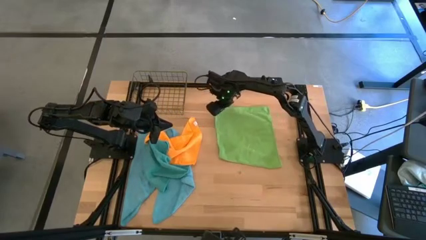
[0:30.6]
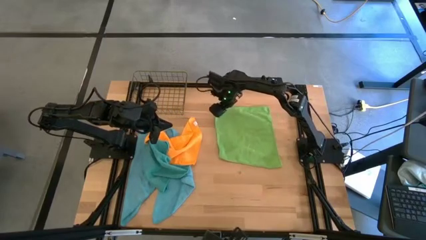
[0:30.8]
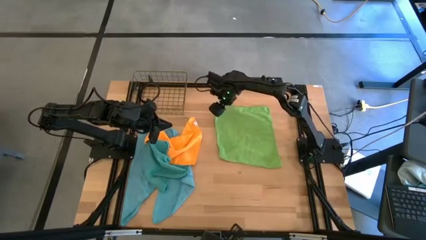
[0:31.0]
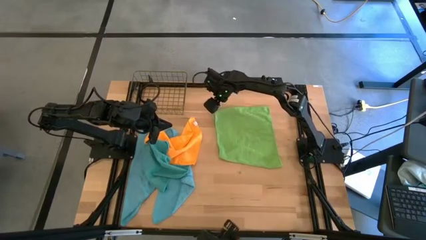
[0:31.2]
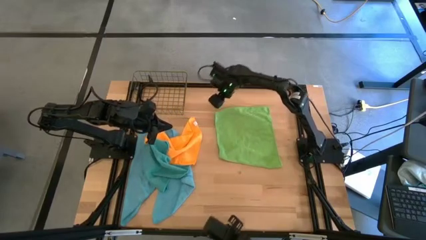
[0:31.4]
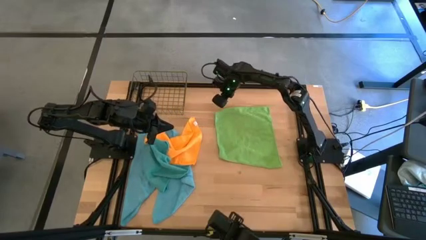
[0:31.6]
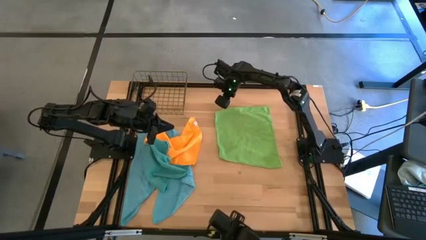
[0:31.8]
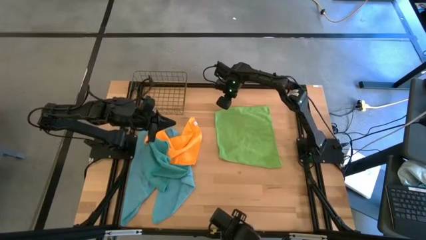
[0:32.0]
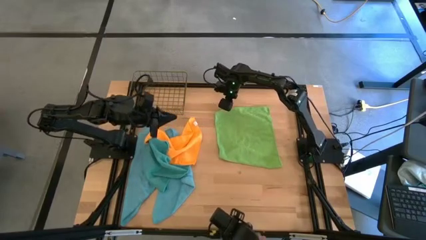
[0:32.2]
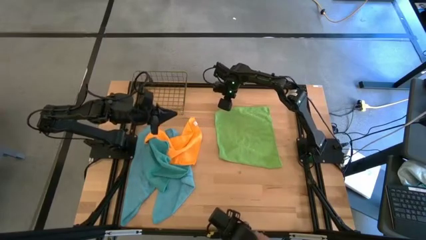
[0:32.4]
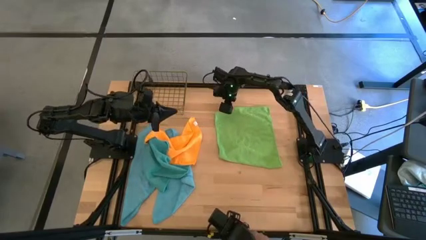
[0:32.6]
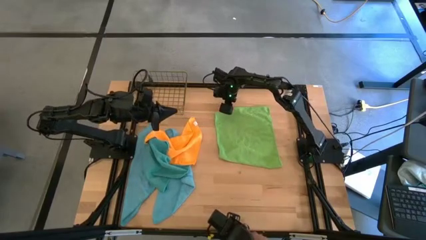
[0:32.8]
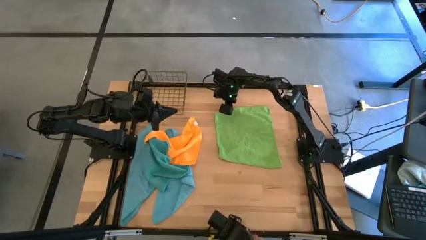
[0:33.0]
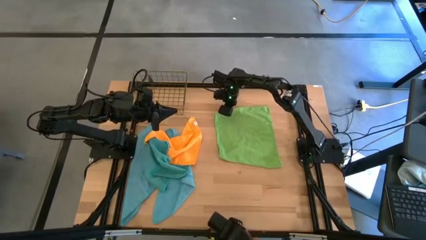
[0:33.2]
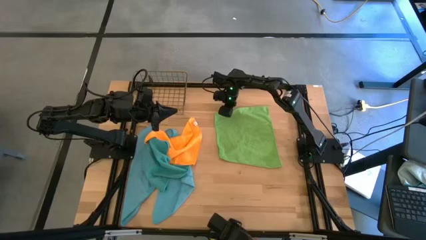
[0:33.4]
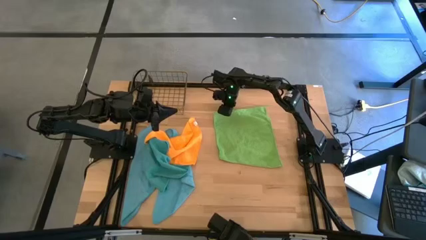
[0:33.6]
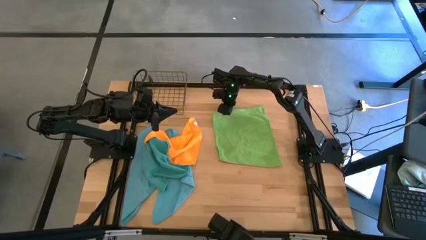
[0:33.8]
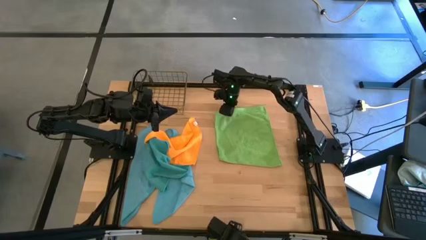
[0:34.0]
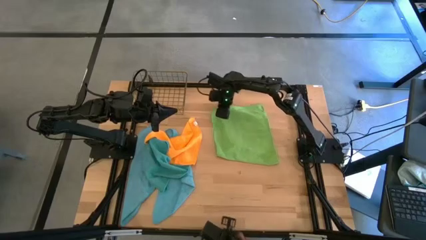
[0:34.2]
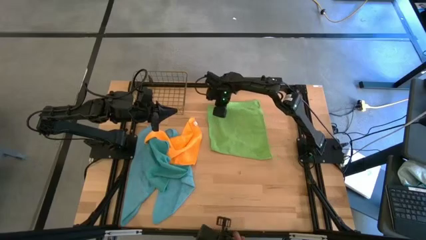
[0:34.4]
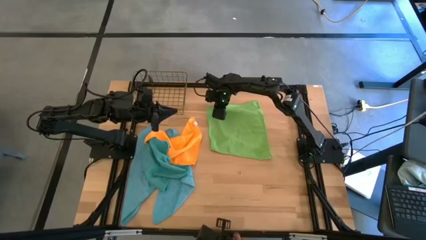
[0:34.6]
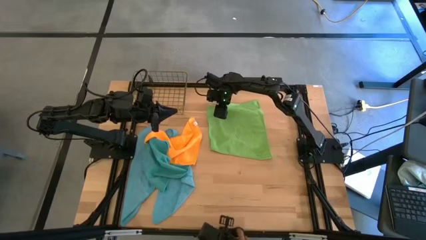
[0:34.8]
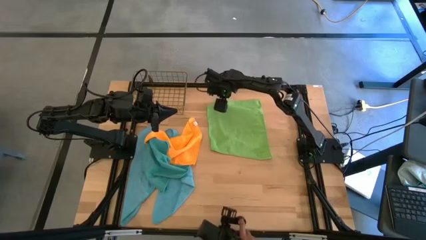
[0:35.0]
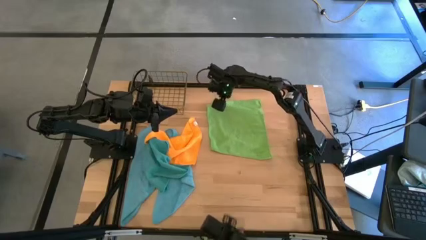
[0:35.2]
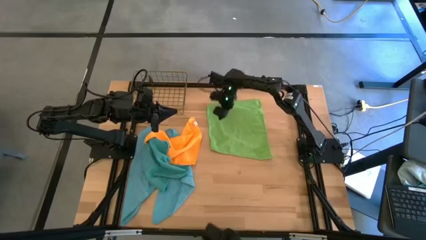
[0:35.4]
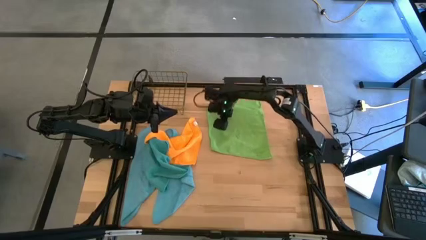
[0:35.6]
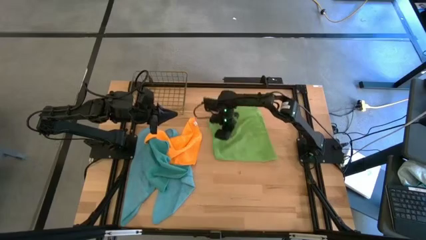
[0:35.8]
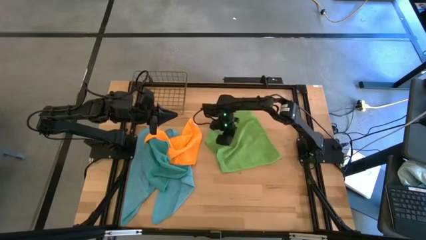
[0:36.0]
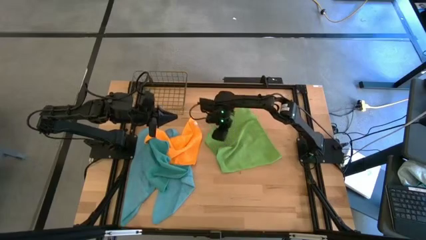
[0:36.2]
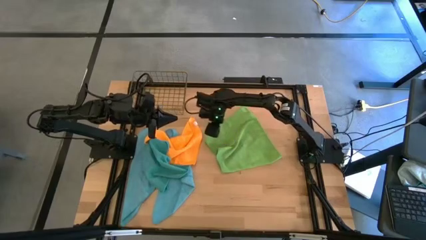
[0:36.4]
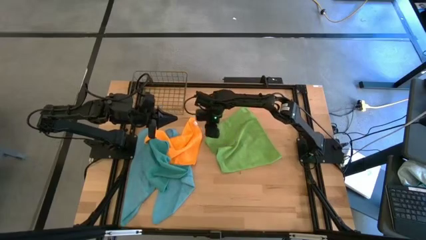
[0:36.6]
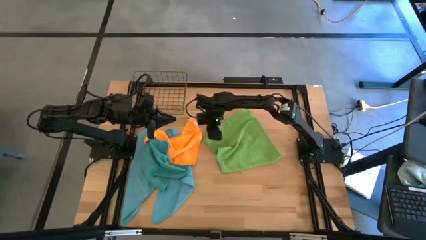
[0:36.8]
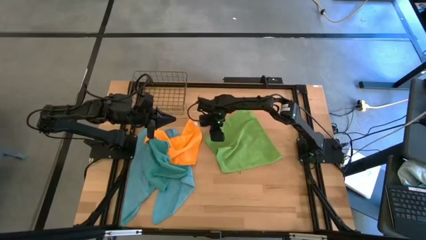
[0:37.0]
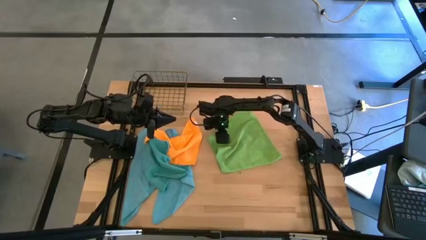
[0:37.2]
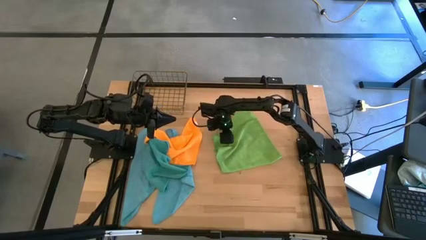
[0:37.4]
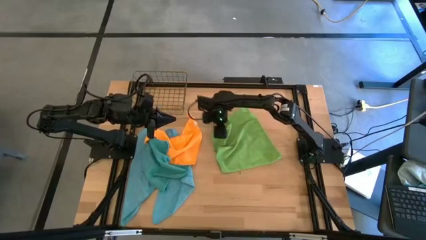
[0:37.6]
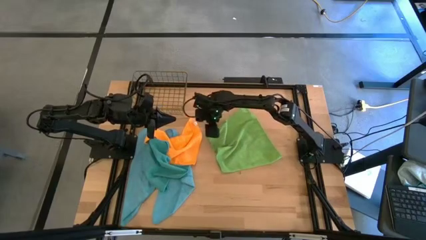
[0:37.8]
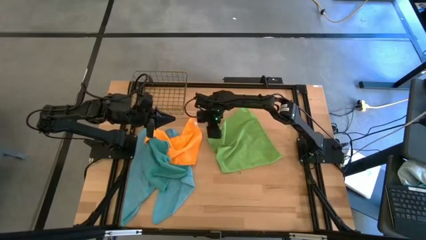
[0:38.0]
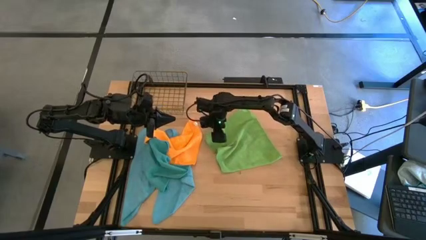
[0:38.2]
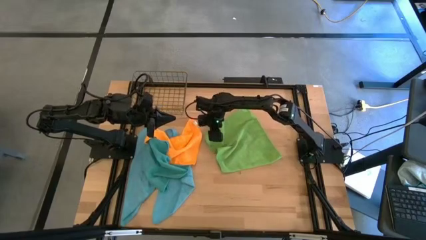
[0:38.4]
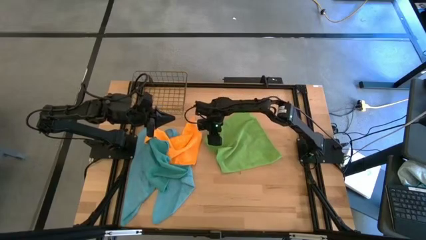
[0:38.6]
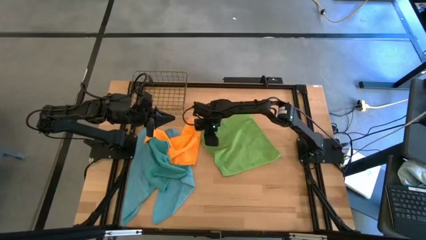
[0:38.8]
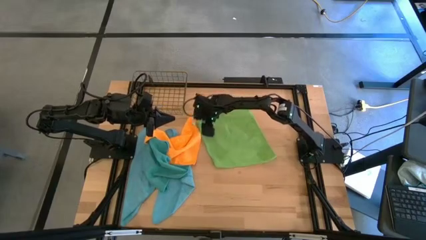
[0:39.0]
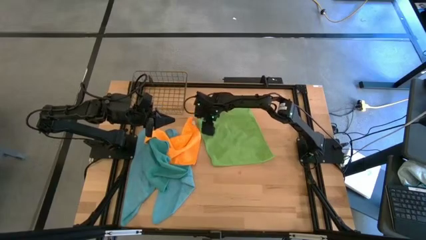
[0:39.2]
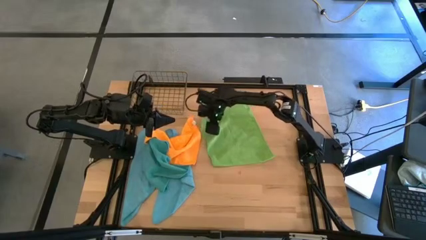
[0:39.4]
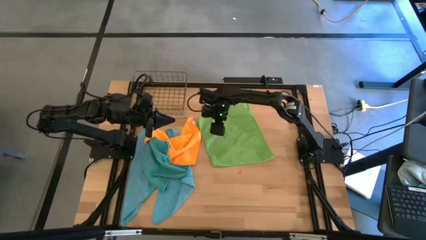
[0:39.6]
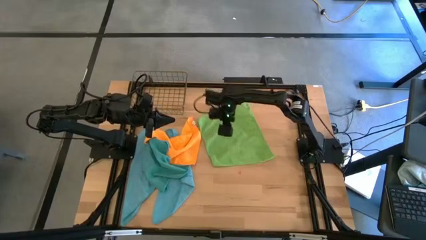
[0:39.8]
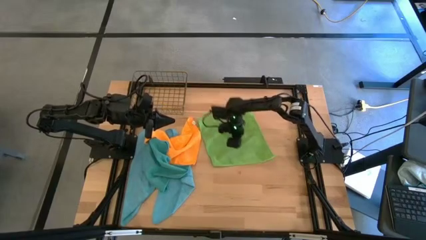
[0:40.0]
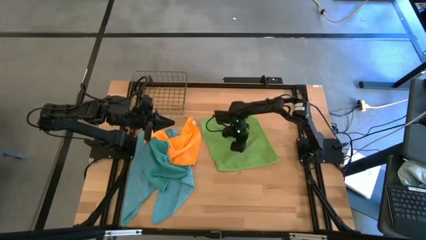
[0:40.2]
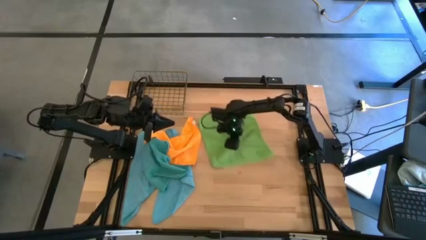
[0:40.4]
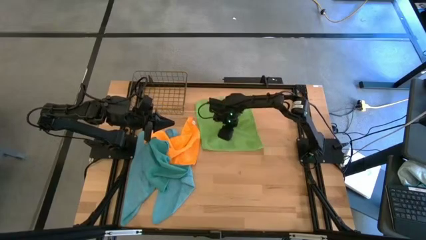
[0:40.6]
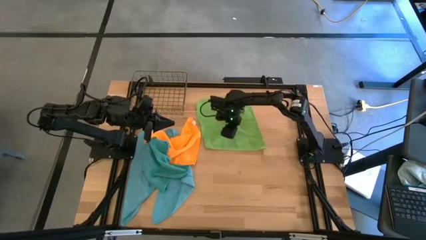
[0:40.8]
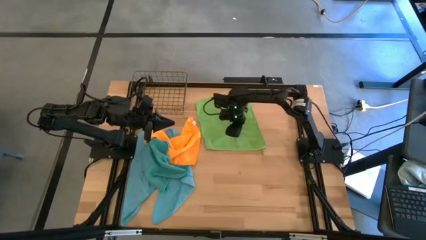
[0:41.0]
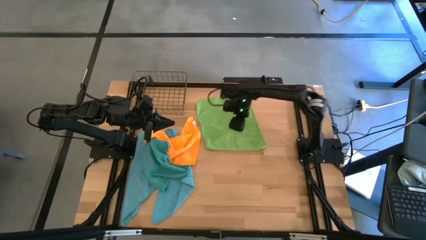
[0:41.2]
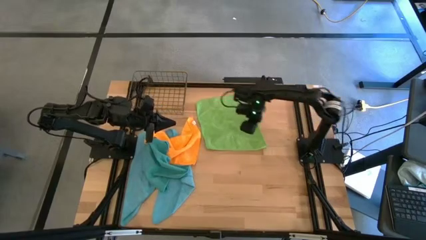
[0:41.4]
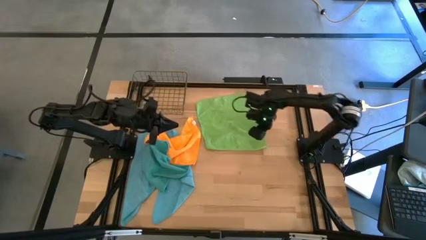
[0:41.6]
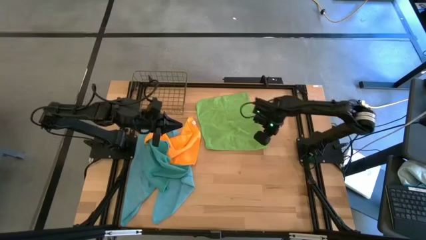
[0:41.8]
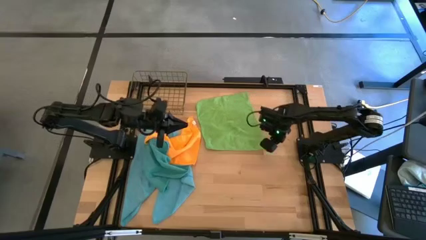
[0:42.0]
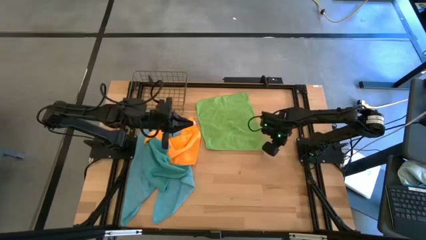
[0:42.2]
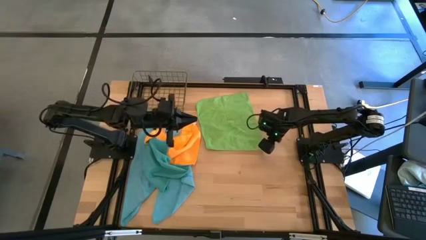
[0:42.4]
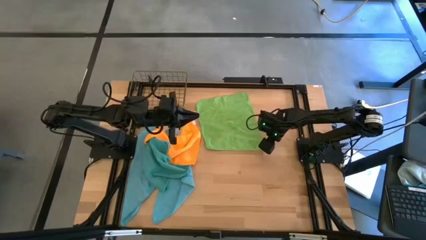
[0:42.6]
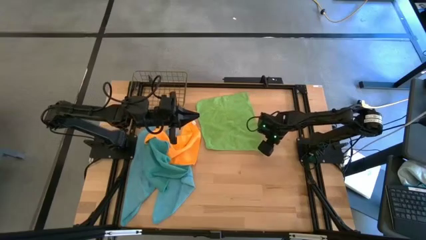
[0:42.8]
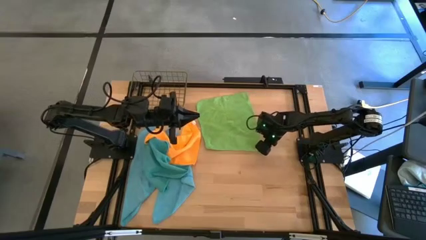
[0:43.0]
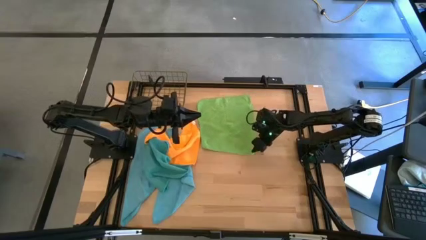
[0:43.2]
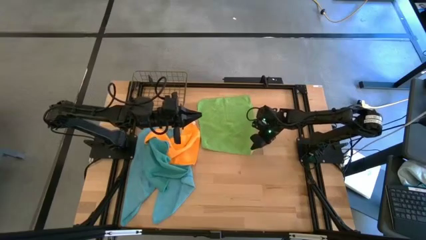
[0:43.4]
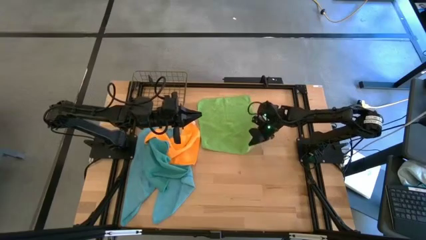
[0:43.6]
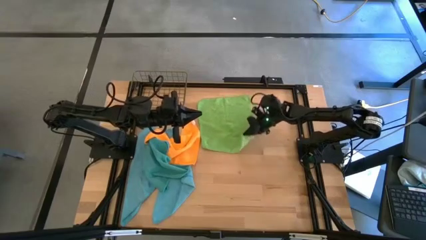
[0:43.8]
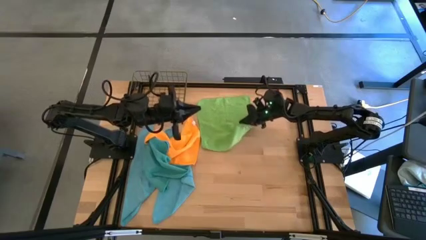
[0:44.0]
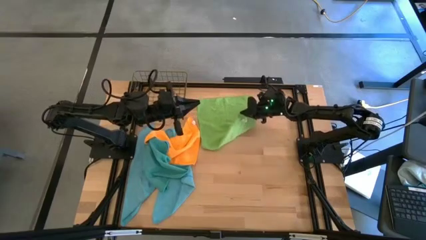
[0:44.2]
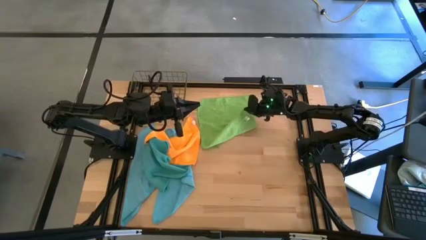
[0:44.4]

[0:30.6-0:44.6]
Task: Fold microfiber towels
Fold the green microfiber cloth

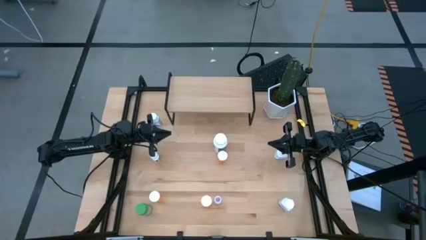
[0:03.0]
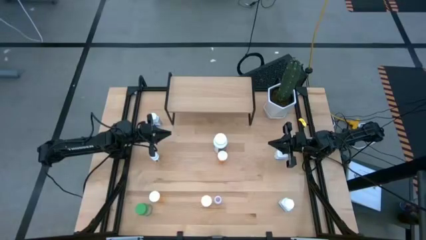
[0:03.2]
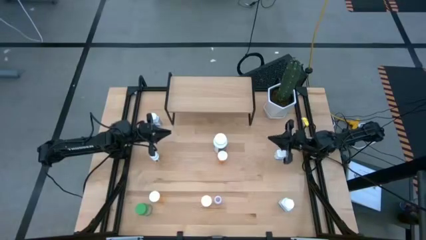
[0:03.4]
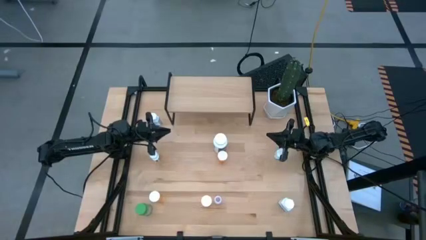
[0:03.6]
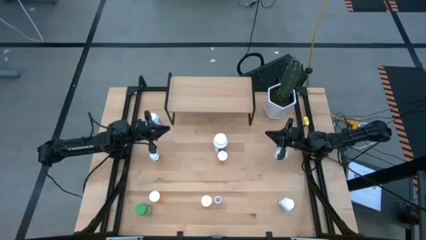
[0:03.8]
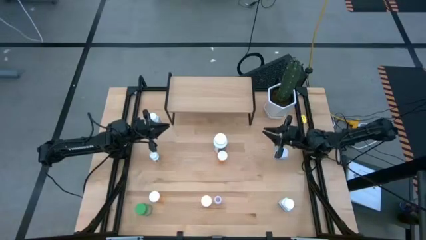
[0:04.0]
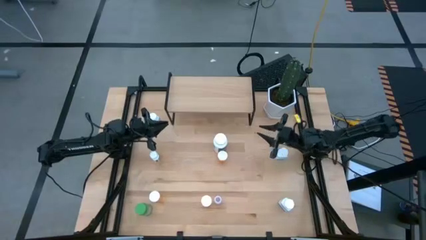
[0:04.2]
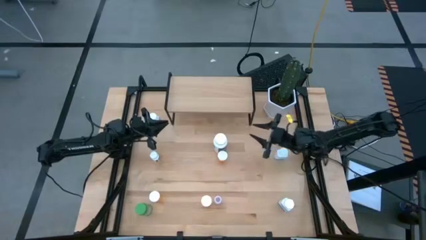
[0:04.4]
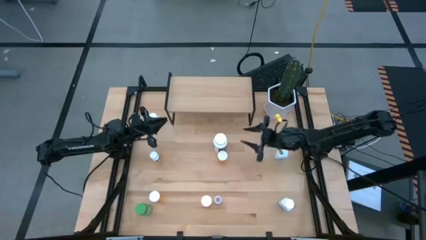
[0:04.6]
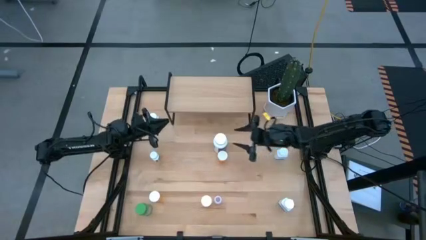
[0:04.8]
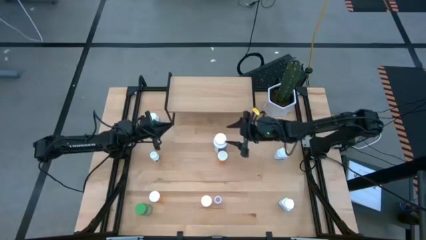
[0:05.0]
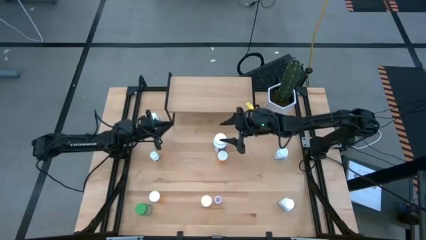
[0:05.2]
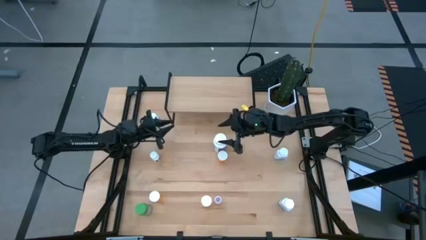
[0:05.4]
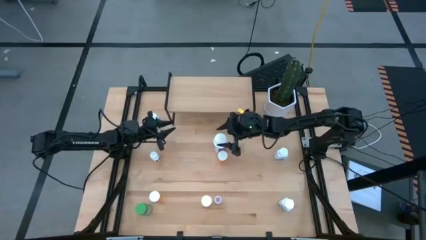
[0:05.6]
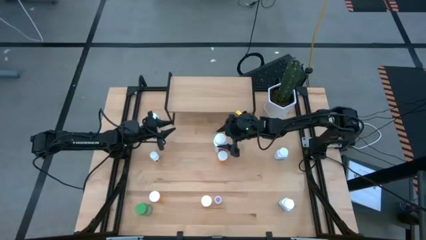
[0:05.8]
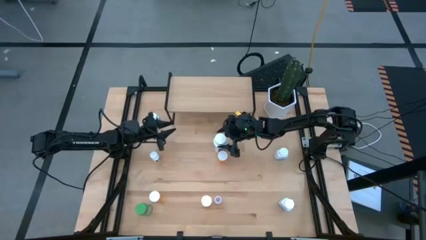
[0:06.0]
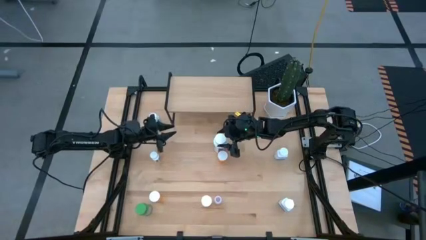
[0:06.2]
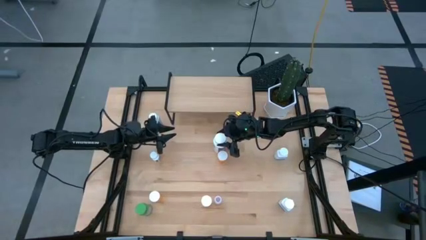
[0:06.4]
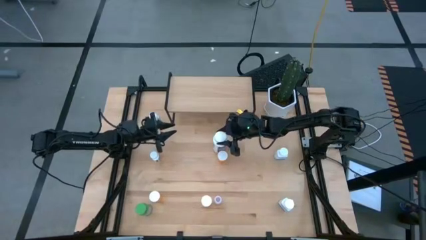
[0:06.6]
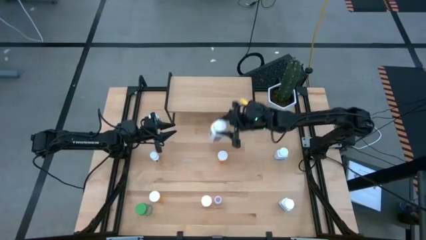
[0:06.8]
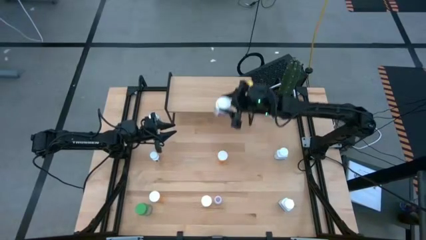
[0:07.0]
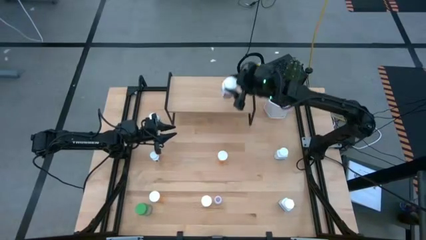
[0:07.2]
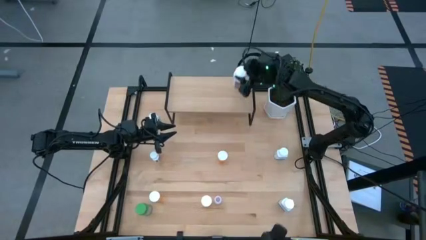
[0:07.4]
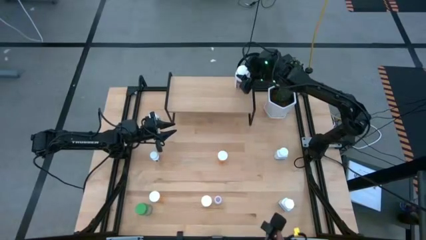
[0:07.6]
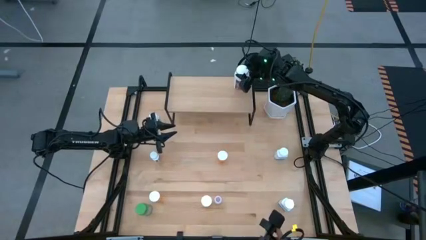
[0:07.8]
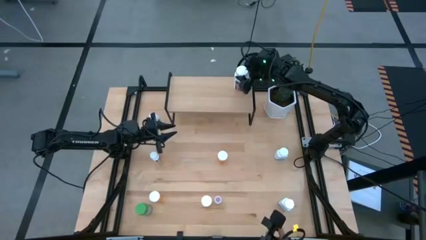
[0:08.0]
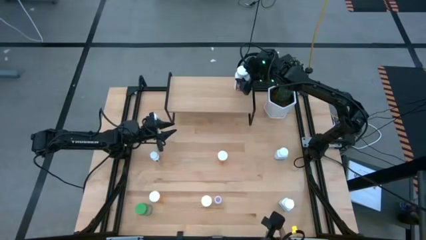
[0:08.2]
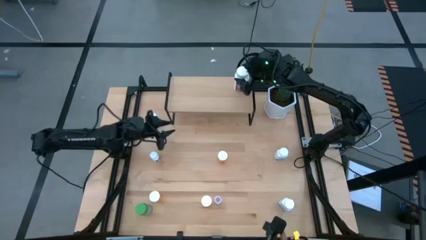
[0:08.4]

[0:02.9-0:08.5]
Task: Pick and place medicine bottles onto shelf by color
Put the white purple pill bottle on the shelf
